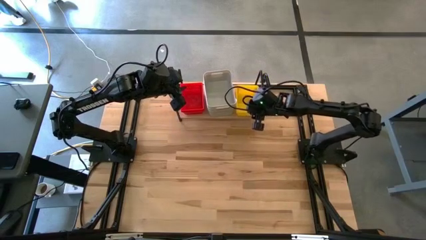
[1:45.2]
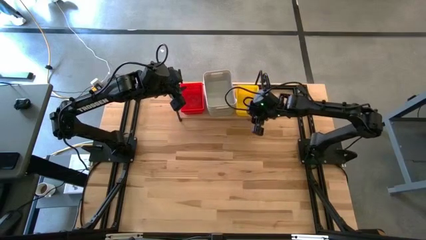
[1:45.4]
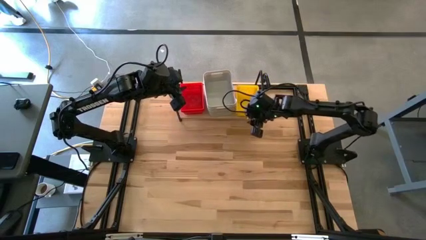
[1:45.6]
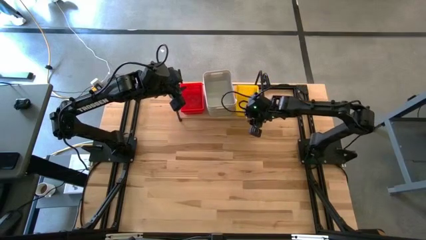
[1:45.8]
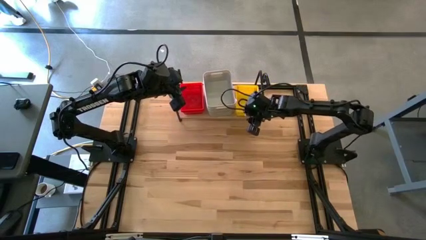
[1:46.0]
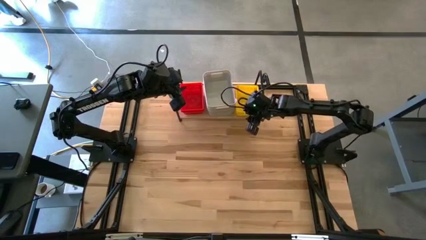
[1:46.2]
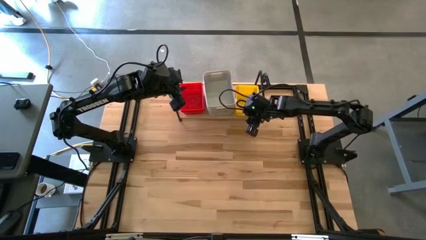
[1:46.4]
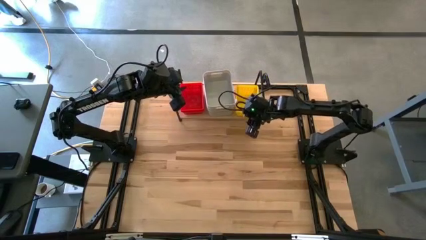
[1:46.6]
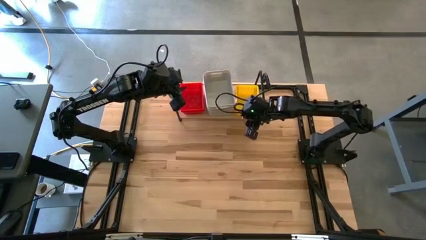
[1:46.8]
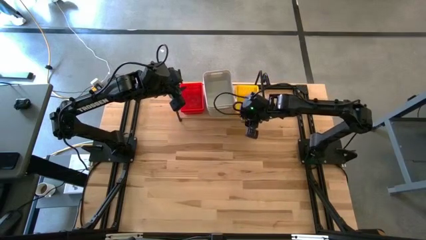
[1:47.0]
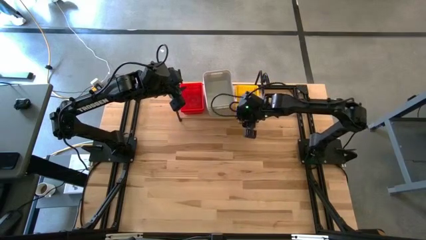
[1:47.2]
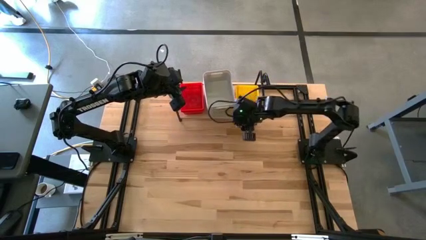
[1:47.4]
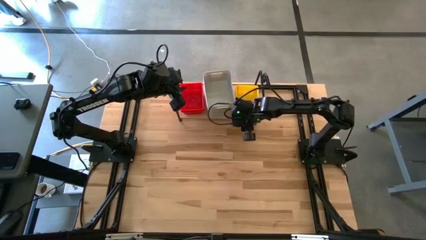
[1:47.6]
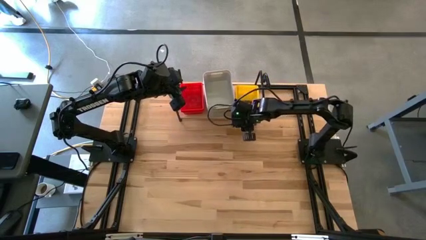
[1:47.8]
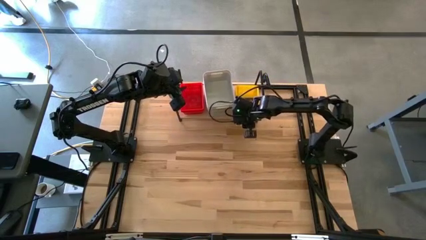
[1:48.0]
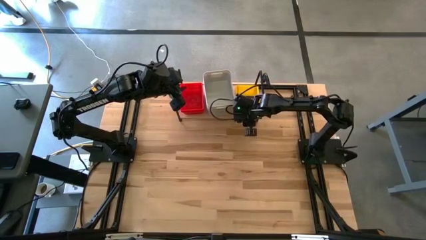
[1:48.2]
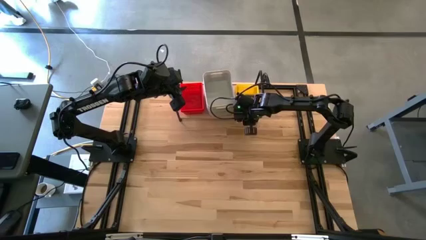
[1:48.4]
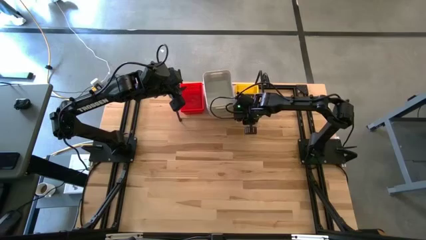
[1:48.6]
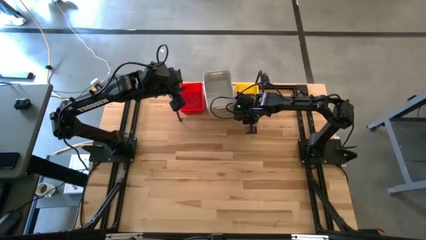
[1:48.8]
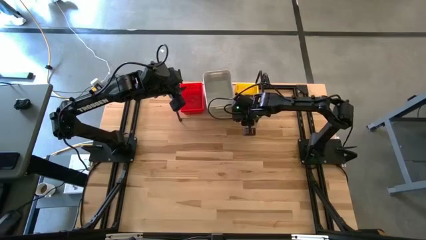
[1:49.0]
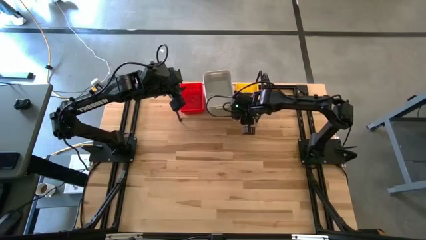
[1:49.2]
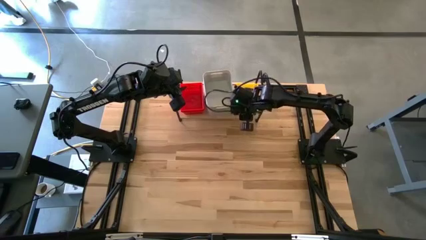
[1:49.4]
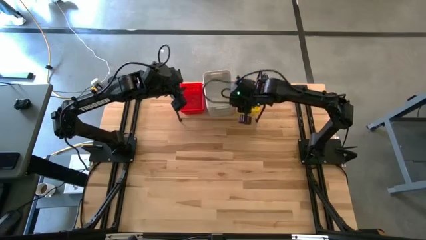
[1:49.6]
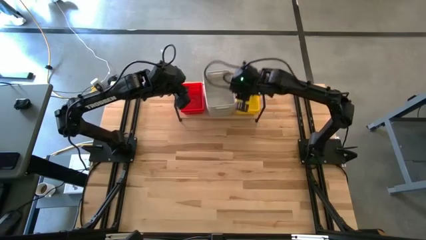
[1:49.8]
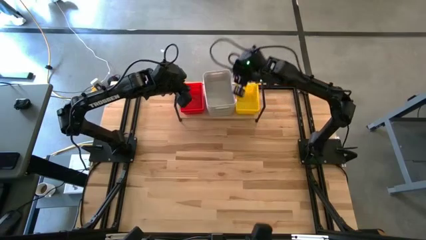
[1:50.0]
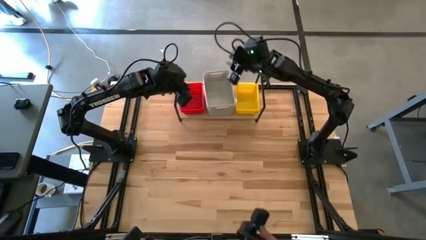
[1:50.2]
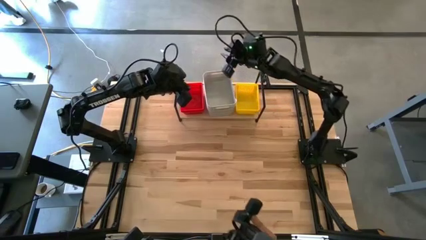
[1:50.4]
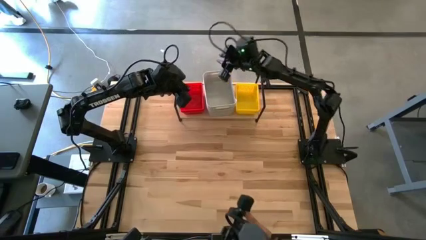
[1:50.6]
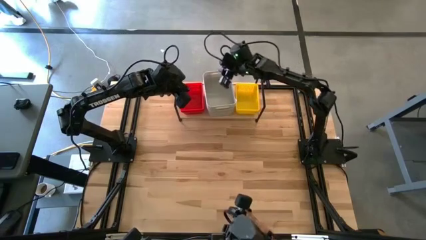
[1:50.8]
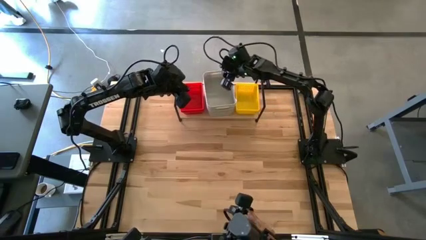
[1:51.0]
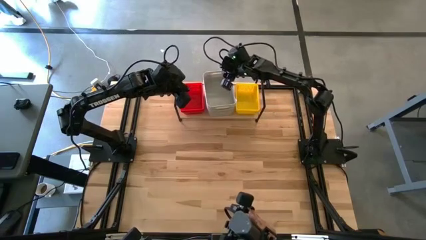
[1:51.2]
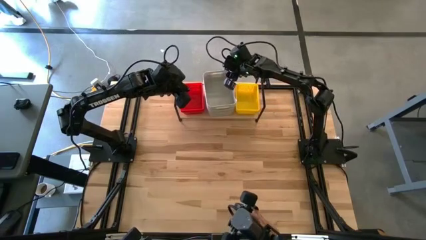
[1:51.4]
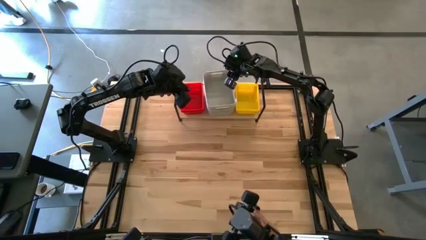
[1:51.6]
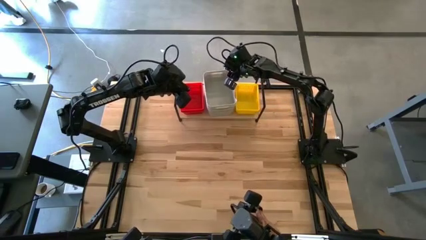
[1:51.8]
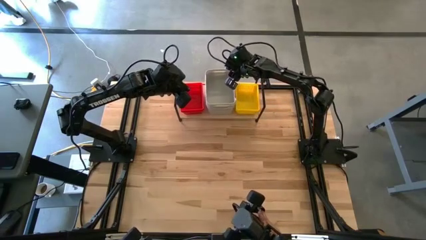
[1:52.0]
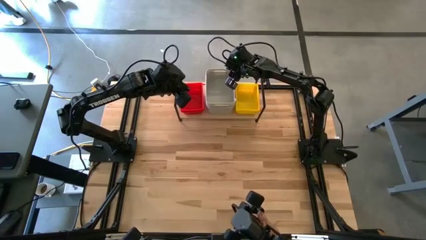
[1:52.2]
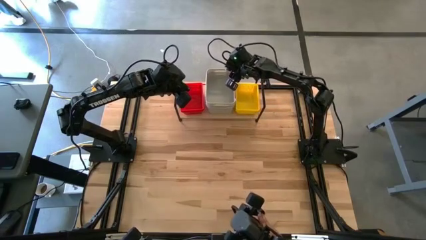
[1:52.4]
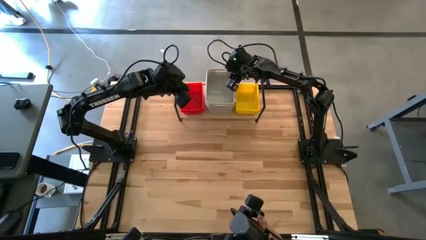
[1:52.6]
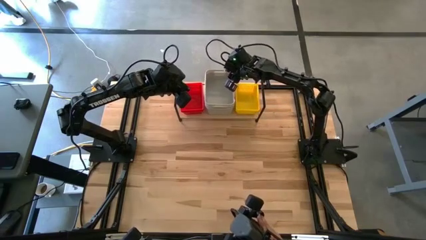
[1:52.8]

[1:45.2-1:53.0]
Task: Stack baskets on shelf by color
Adjust the bins on the shelf

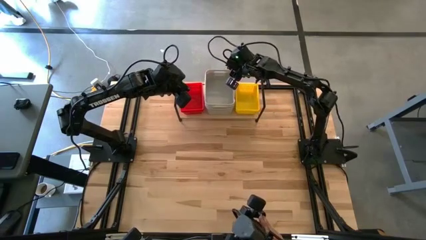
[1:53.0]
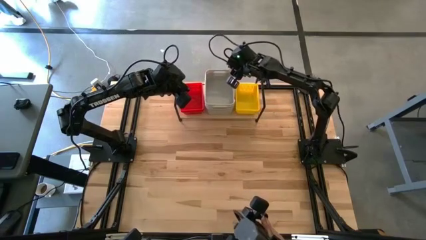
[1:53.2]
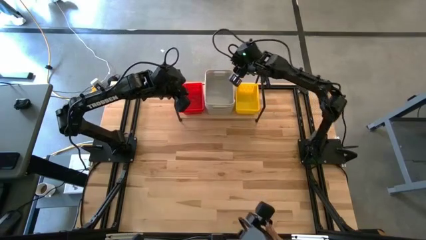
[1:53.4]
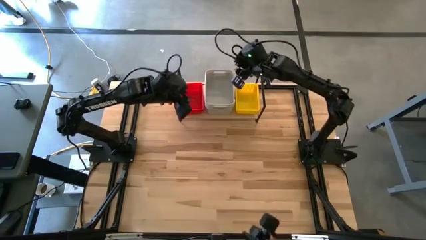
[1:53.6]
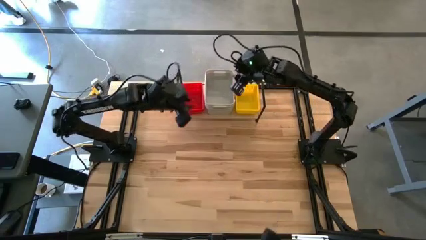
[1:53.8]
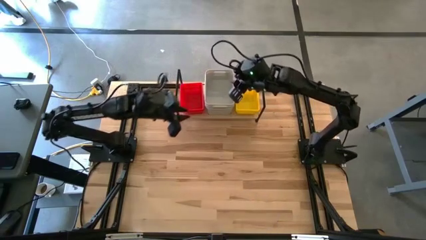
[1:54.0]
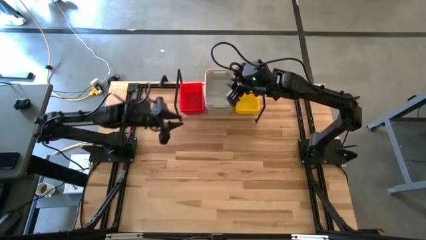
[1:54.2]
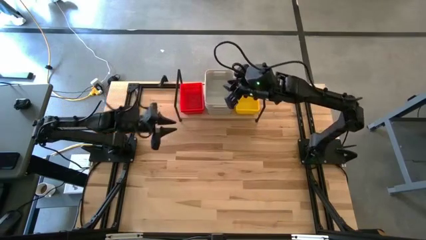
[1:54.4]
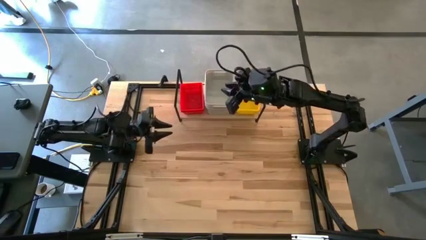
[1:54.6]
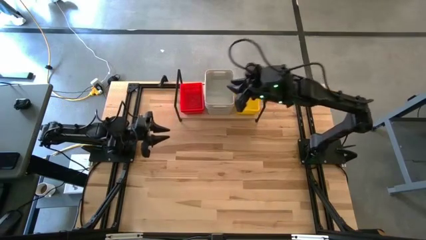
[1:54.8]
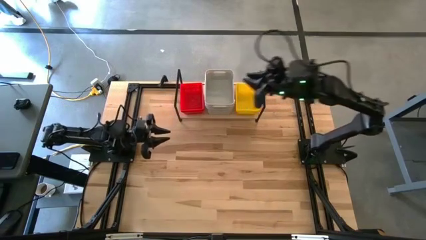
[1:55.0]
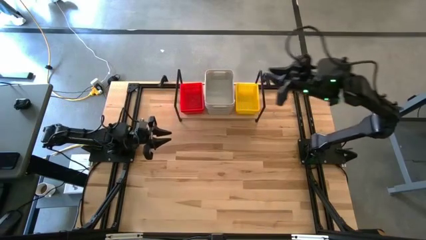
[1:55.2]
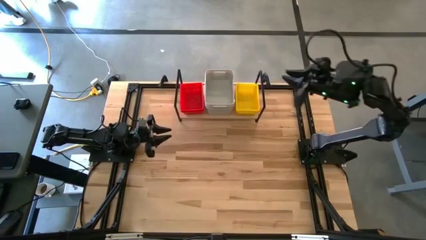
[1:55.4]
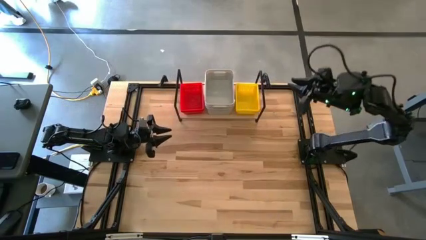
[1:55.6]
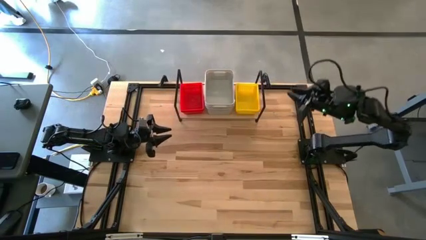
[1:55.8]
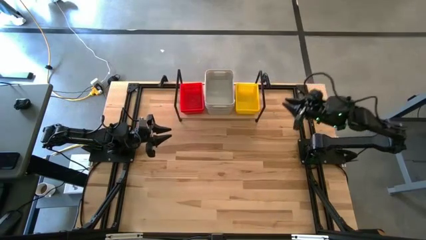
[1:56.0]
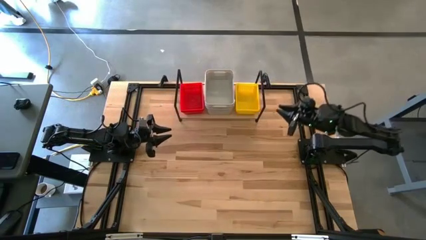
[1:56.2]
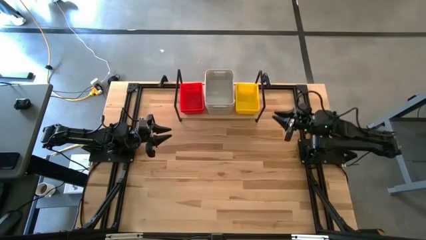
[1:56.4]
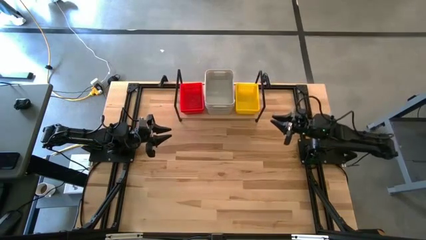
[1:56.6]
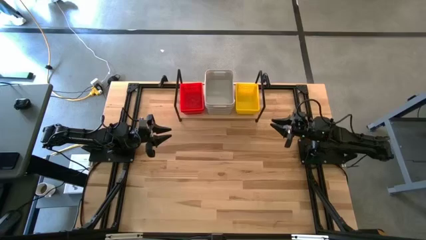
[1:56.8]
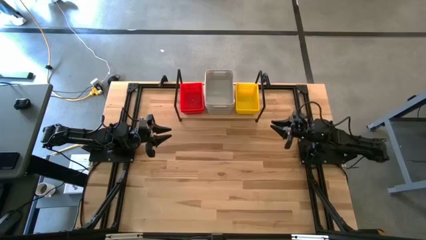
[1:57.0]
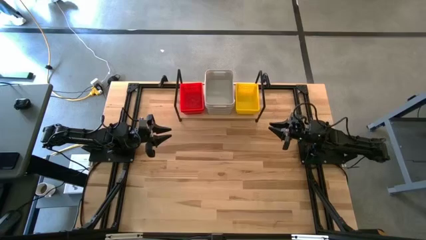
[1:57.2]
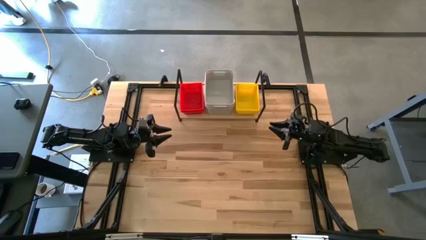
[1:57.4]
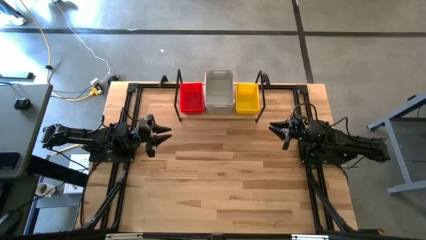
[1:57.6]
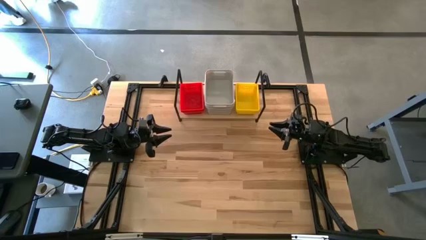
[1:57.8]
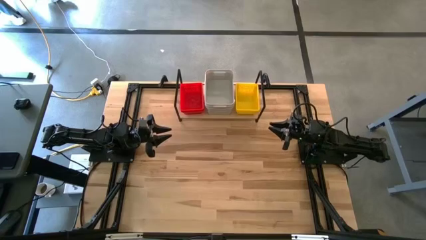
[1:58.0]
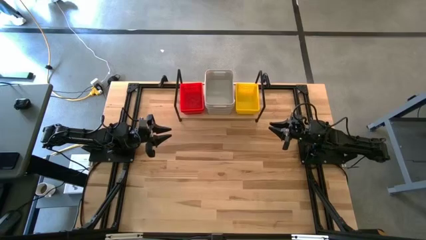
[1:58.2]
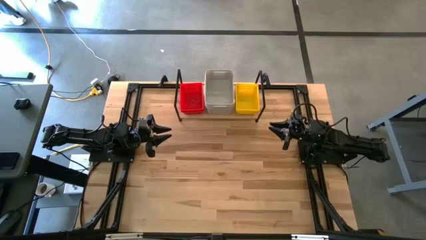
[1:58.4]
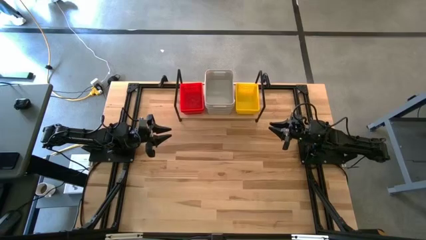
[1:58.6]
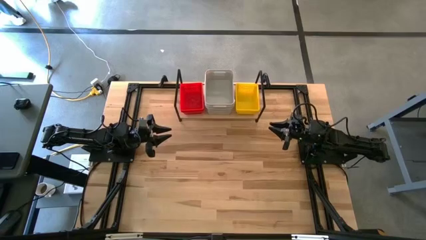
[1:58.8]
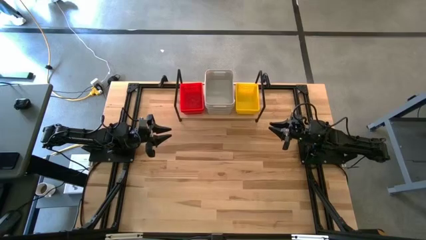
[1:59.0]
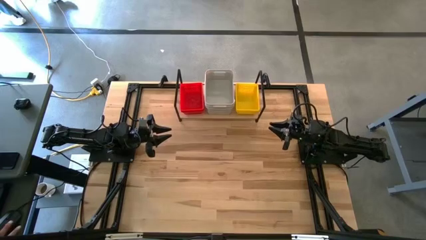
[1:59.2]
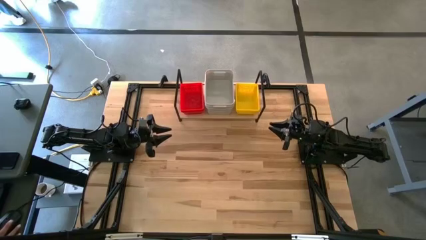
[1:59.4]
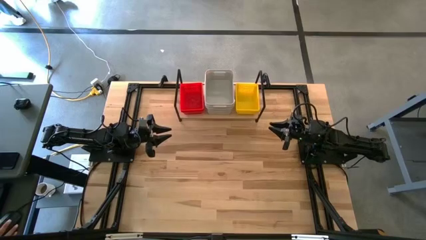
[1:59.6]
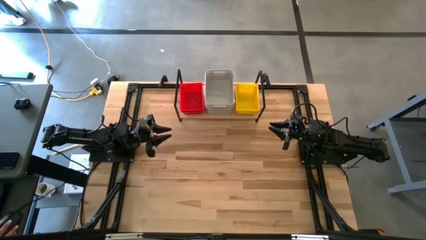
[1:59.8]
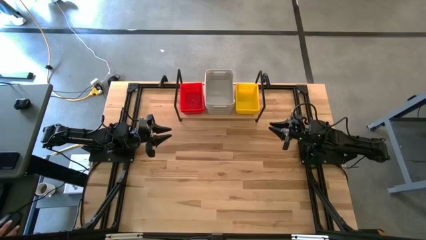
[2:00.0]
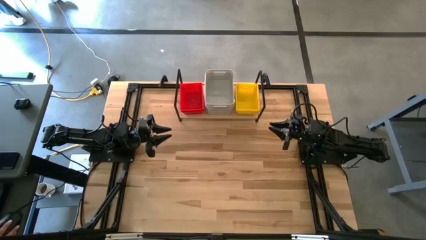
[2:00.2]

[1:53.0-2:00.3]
Return to Home Position

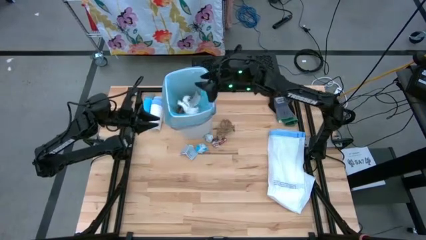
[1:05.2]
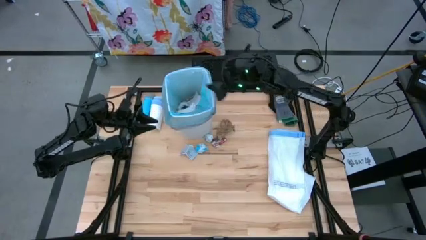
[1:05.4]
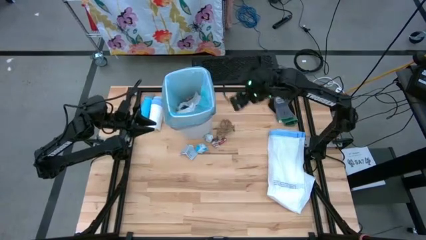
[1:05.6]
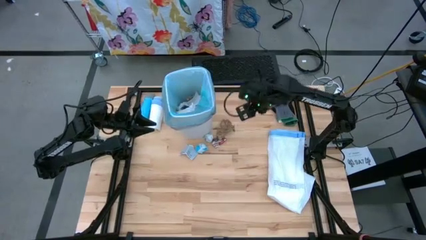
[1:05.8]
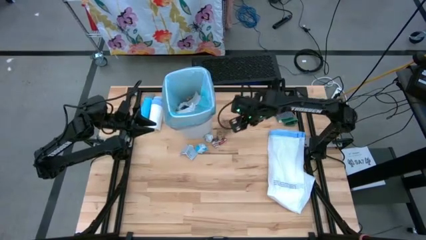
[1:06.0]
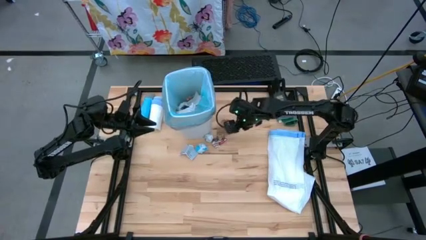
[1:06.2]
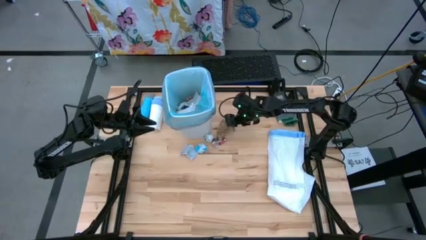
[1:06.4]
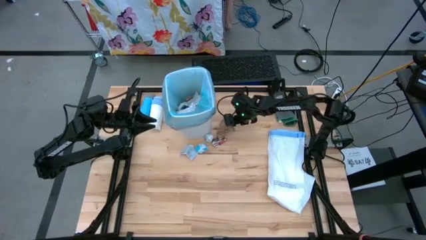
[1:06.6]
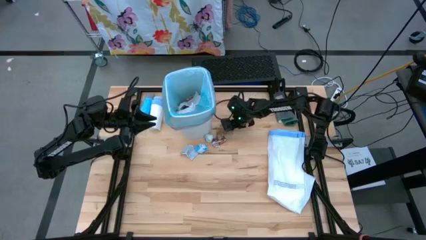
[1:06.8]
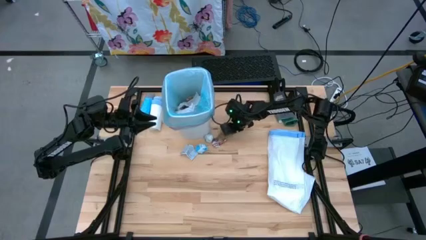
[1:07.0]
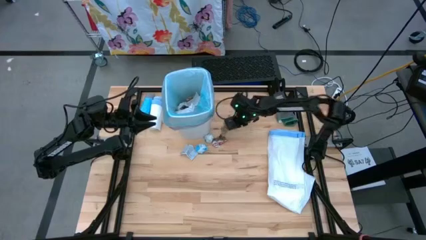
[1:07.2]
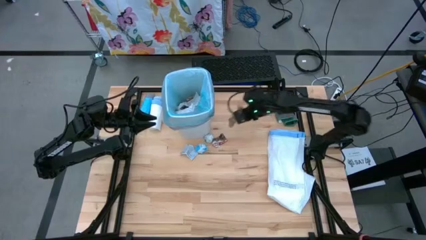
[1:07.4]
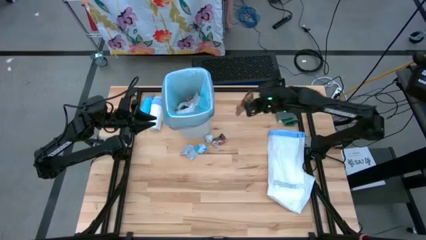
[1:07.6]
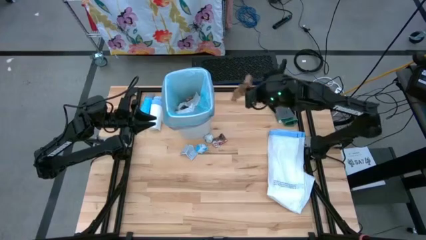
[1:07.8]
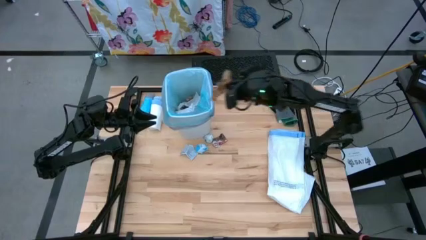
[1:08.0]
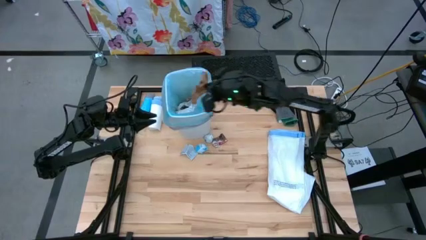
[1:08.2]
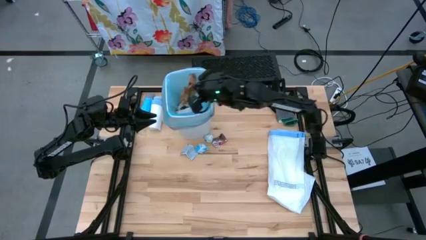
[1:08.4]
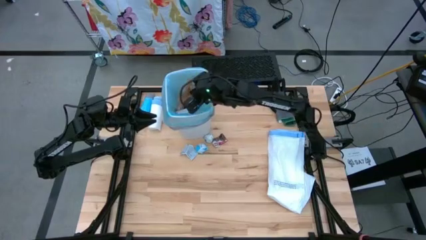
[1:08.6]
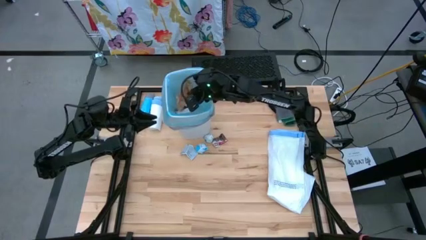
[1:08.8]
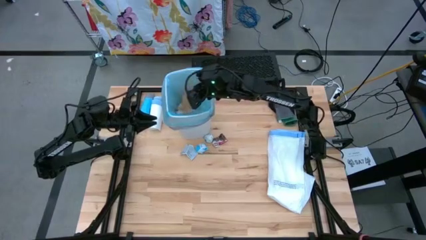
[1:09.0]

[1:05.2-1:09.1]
Task: place trash/remove bag and relplace
Put the brown napkin into the white trash bin
